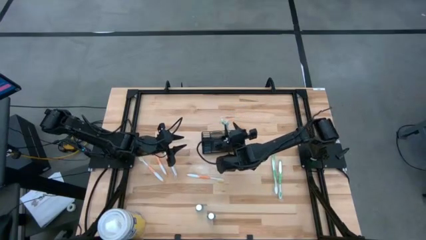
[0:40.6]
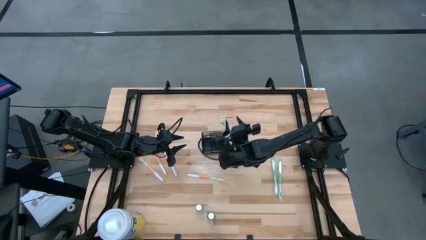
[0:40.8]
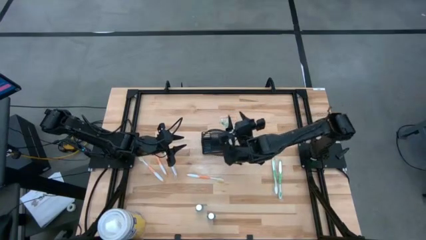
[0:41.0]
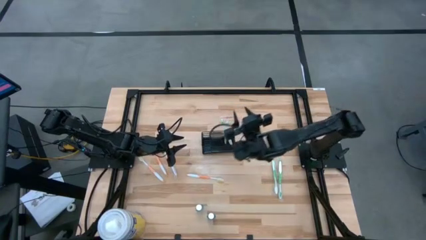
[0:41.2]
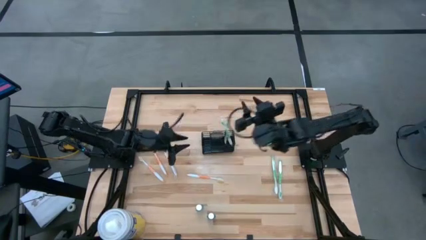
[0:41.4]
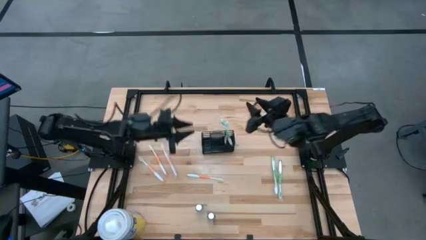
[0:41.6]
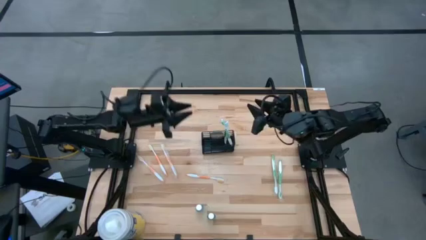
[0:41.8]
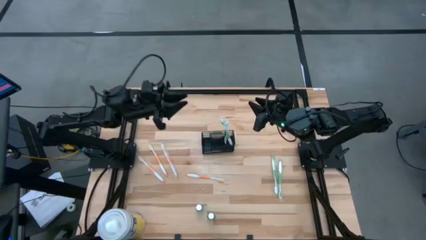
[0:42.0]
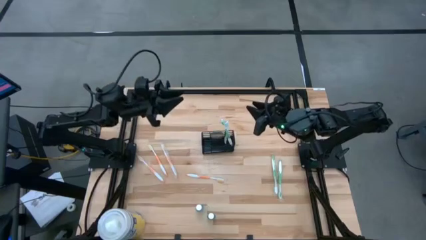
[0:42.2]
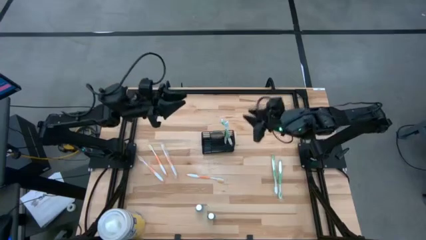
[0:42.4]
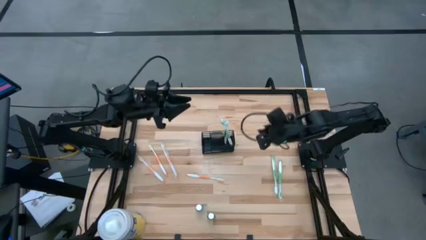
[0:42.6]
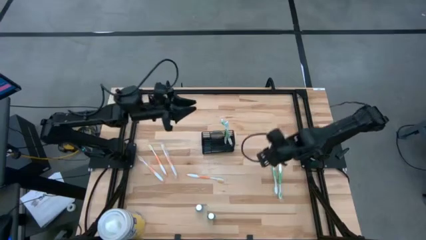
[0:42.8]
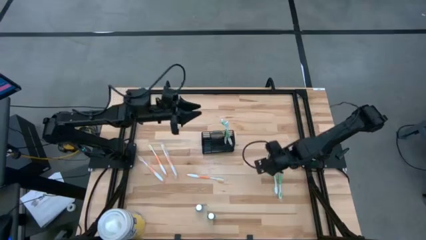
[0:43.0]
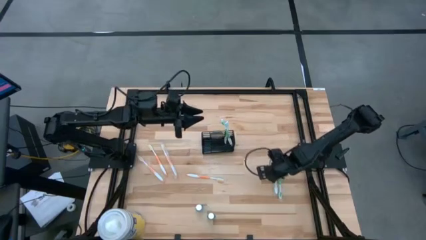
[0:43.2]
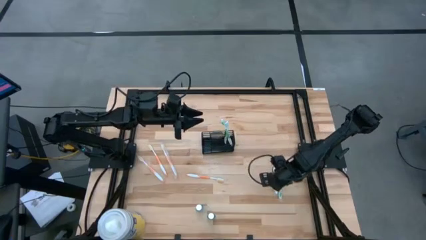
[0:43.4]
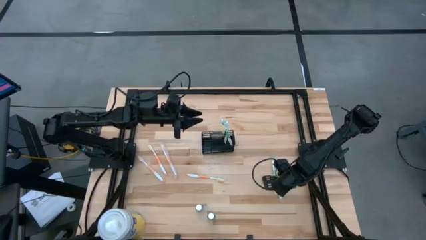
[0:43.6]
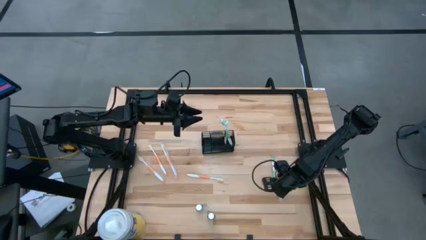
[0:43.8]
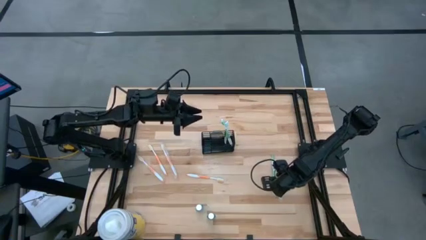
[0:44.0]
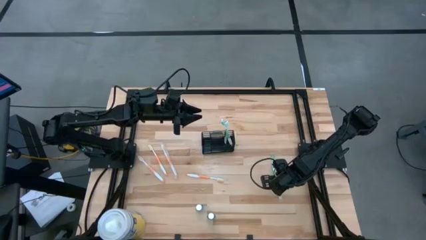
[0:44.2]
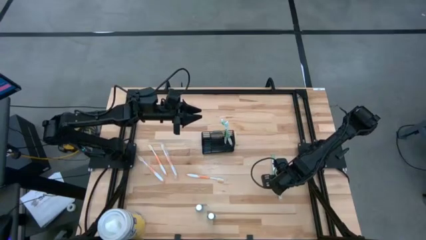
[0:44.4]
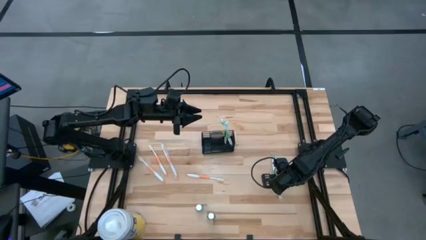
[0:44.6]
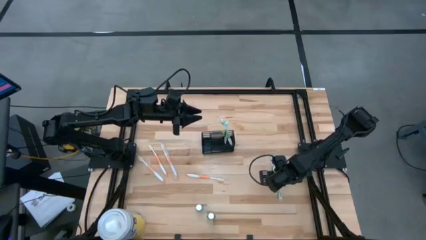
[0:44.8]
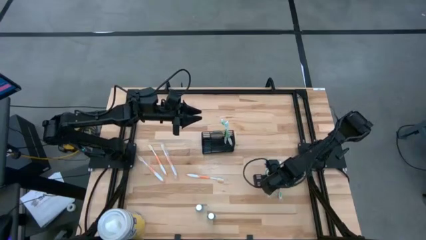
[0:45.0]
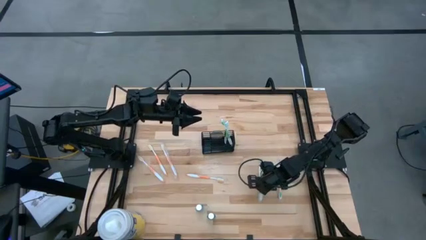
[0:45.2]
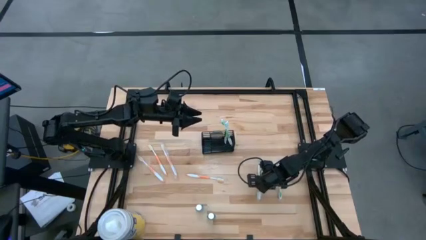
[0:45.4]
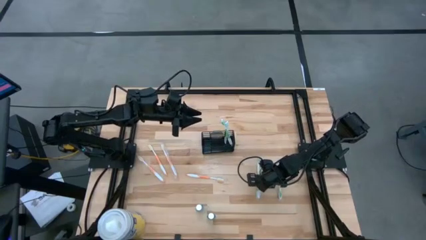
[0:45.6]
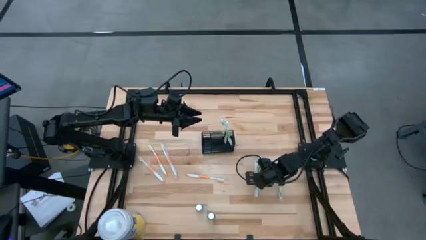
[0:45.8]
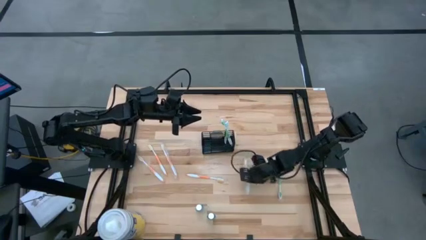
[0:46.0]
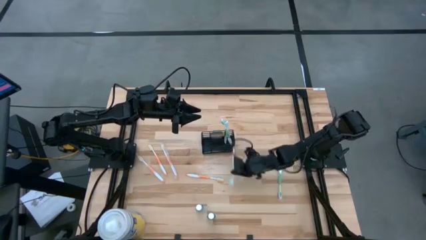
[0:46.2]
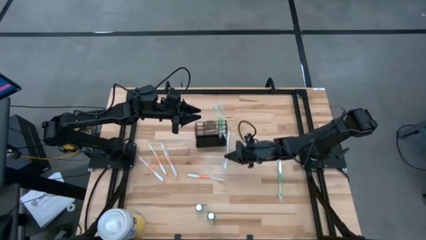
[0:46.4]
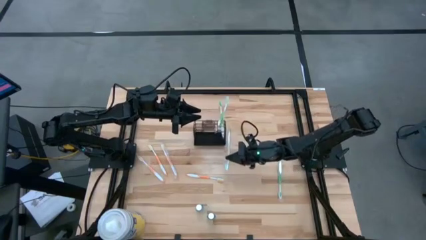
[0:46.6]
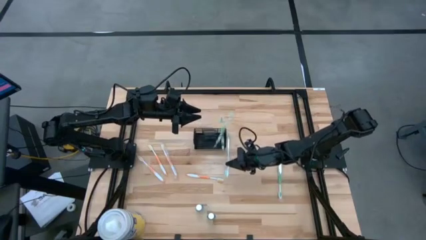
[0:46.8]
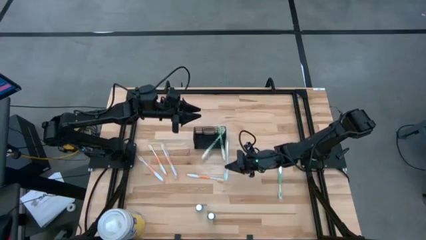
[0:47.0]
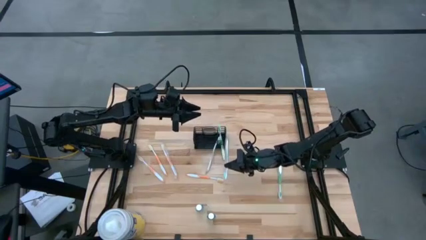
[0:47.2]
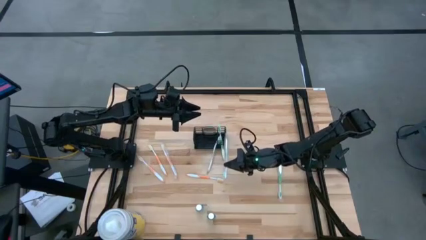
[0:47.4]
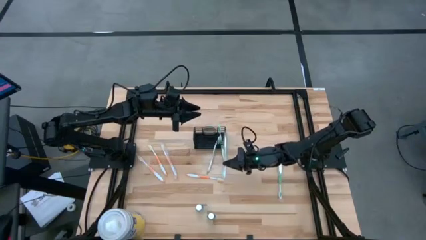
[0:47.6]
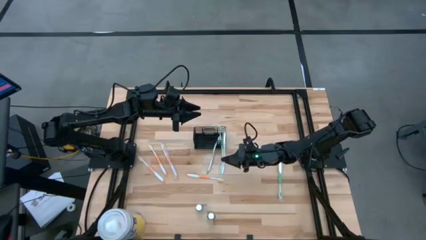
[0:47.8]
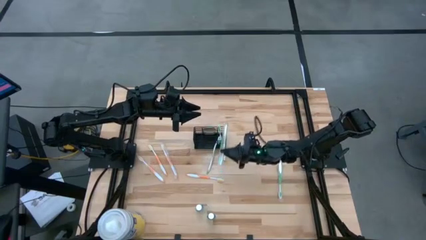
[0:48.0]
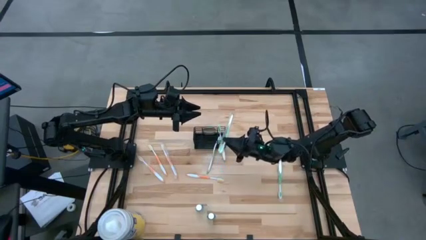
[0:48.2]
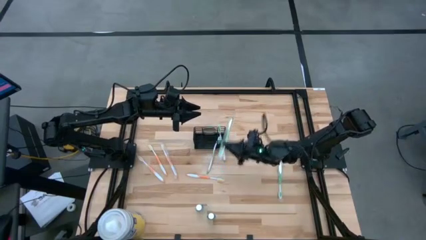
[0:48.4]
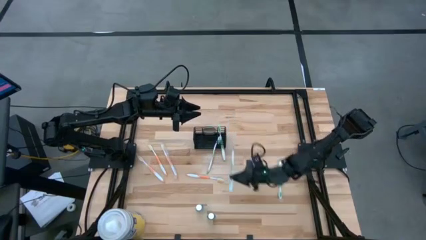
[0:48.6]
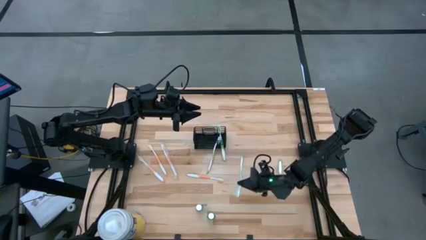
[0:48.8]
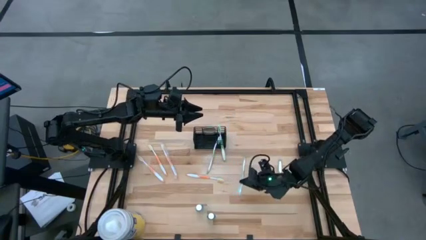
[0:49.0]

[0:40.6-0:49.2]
Task: Pick & Place toothbrushing station
Put the left green toothbrush into the wire organizer

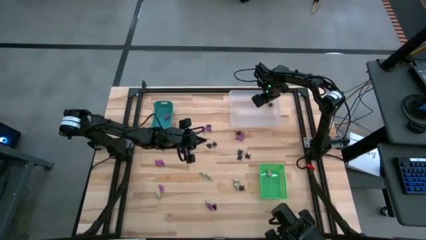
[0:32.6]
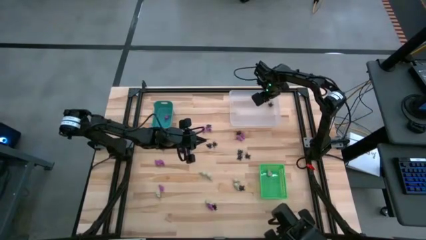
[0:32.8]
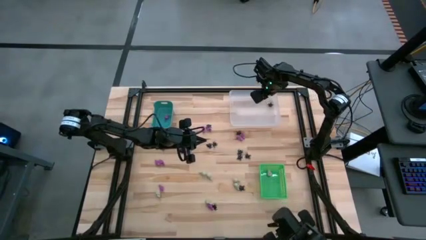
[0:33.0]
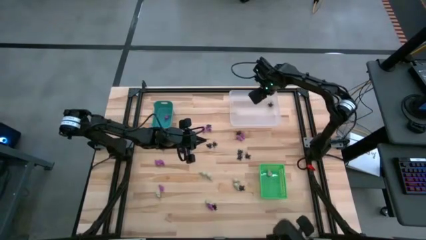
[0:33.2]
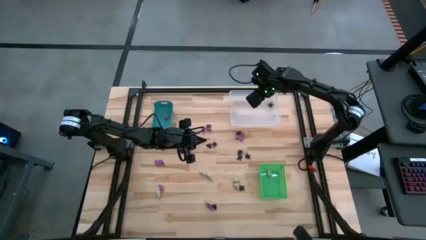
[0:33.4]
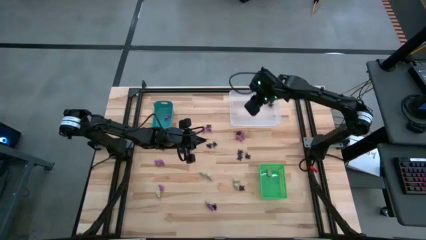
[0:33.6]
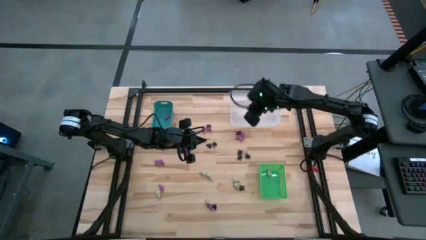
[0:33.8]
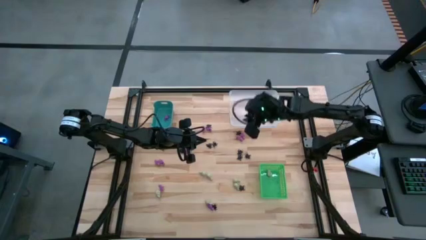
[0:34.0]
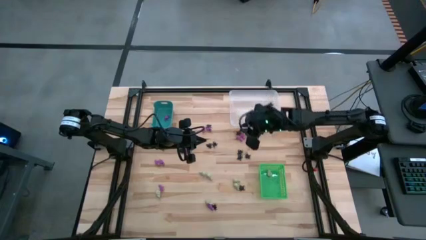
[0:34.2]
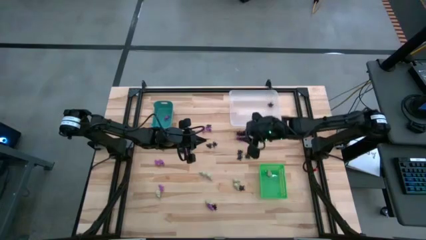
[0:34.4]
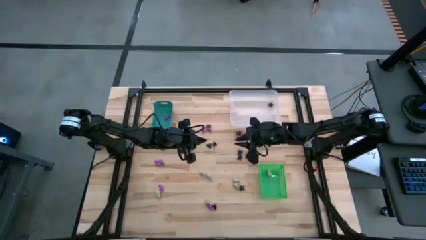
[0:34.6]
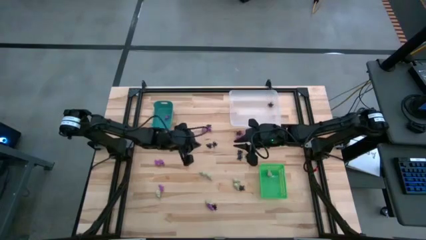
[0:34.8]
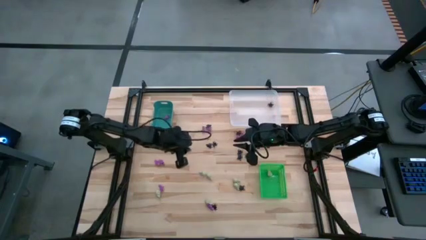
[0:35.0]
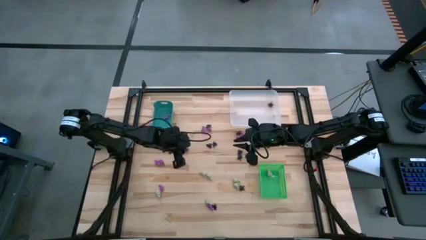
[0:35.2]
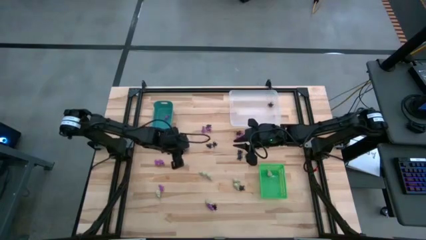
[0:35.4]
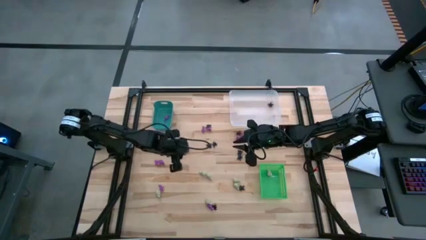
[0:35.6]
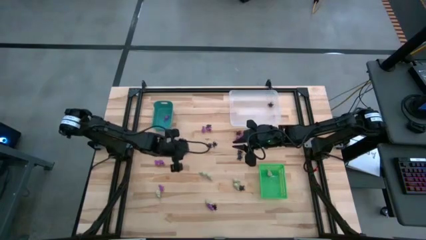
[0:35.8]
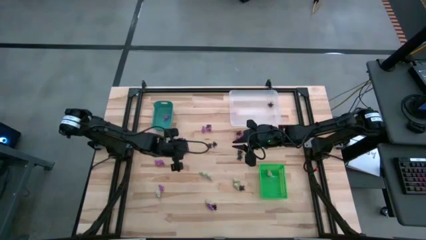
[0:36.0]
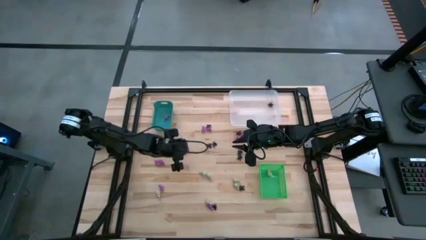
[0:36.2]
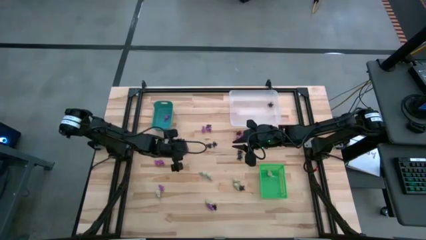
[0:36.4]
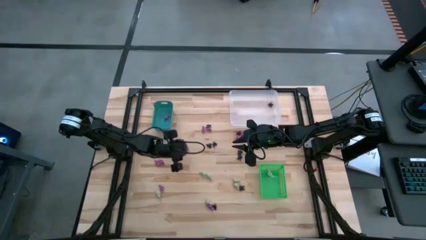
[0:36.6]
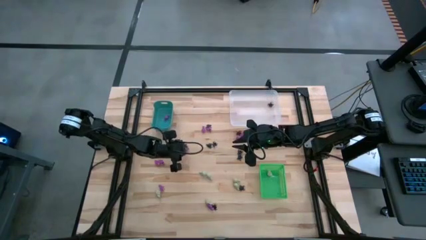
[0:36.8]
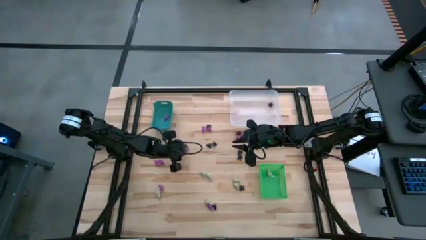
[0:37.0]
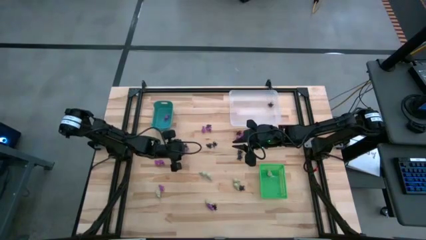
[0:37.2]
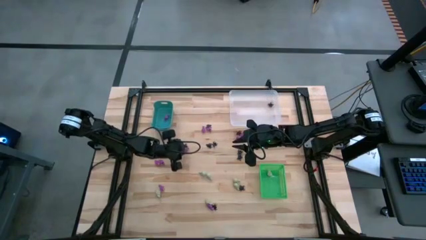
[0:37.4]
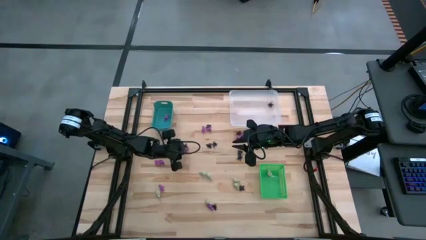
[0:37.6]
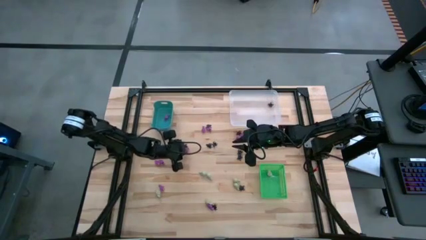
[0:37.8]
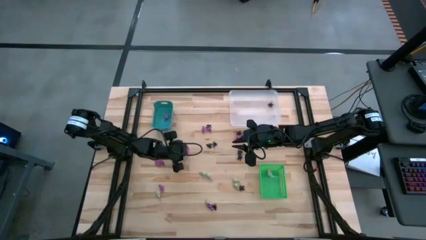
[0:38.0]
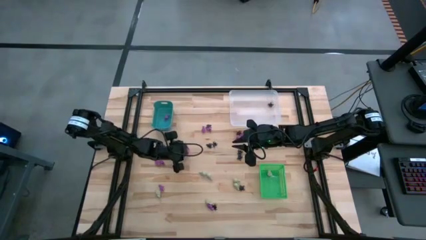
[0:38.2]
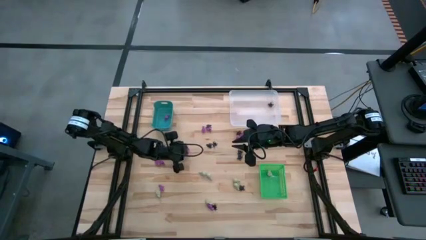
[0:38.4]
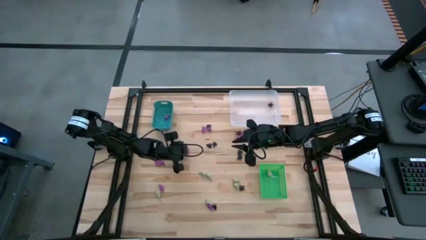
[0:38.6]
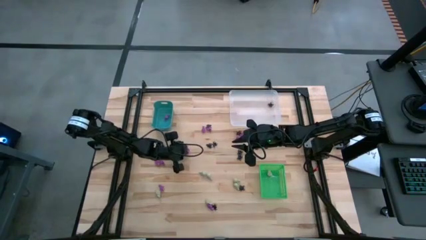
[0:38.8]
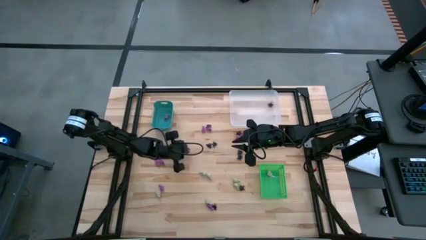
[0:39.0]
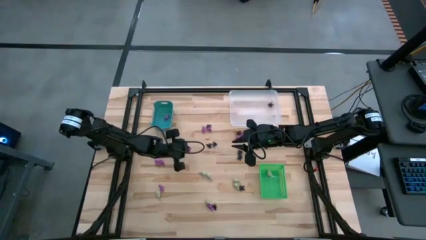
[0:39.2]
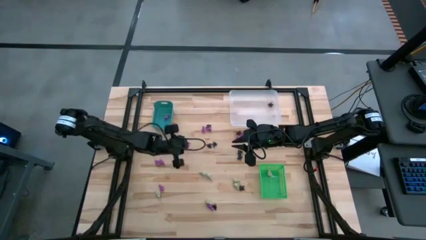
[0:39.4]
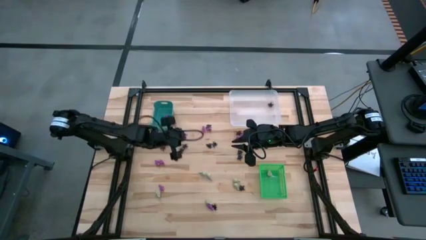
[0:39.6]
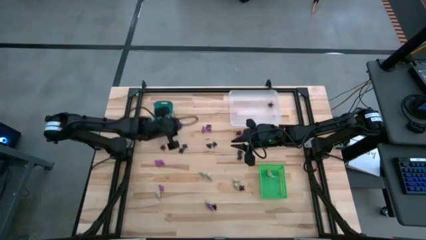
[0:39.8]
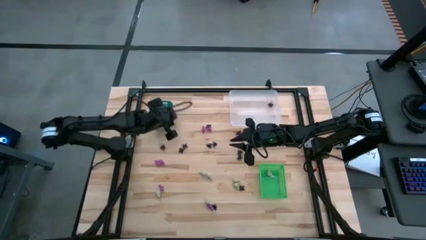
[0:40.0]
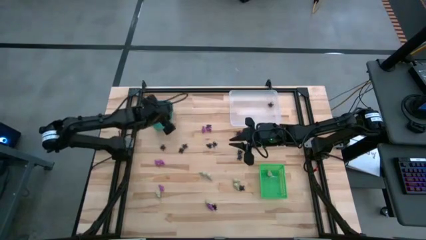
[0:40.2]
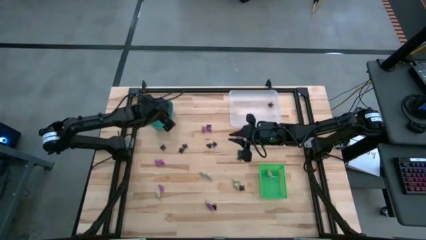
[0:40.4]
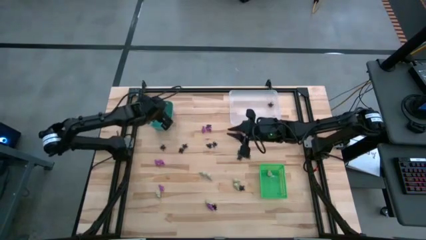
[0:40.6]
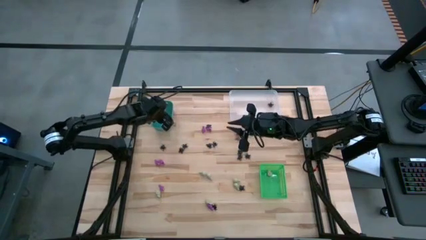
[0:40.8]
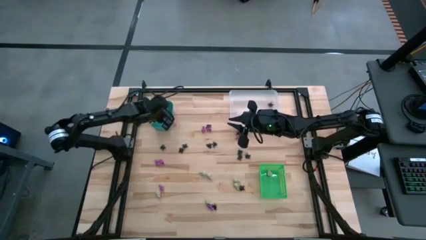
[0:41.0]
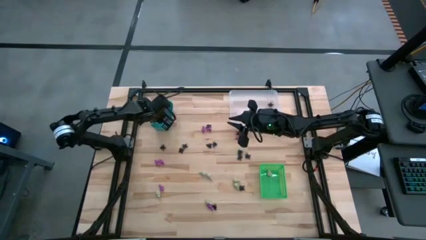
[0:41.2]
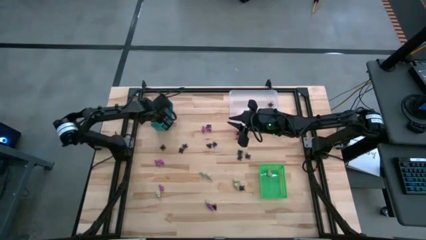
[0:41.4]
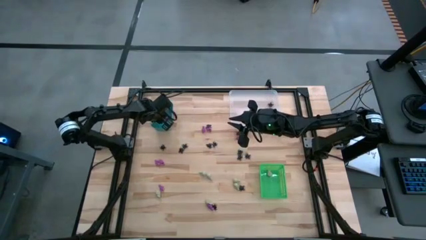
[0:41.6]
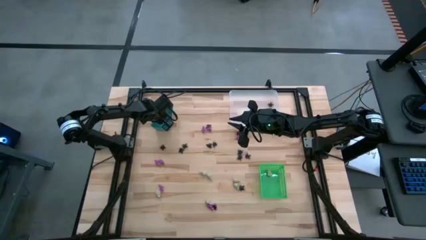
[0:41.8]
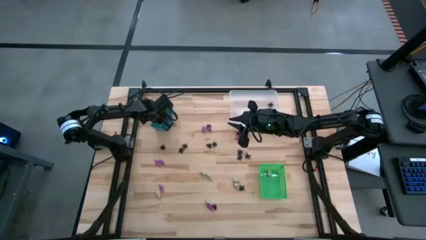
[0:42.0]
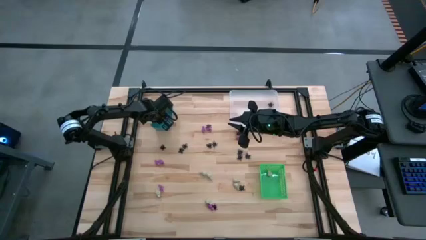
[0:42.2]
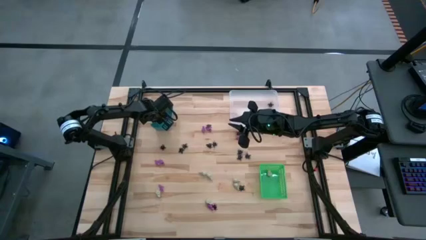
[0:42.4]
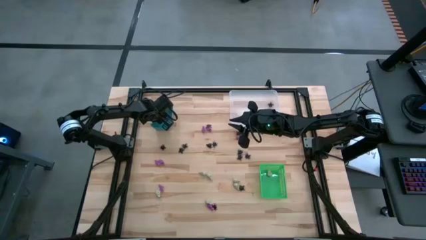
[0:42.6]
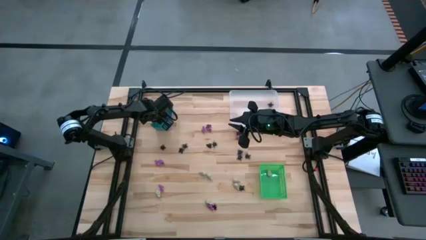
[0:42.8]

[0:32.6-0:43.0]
Task: Sort Halloween decoration
Put the purple skeleton toy into the blue bin
